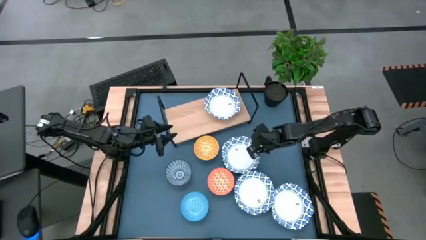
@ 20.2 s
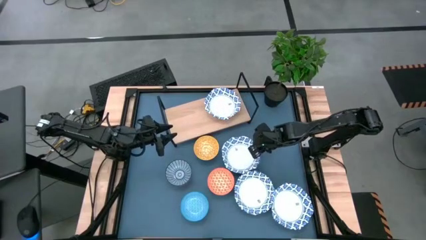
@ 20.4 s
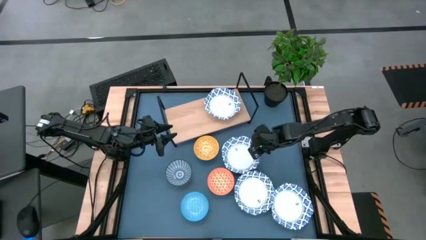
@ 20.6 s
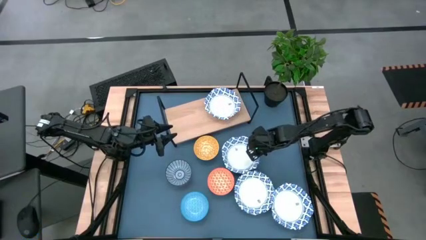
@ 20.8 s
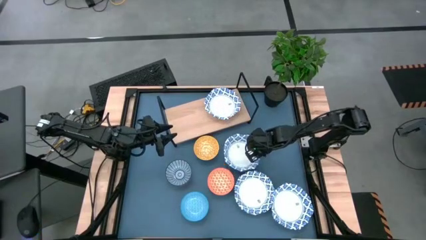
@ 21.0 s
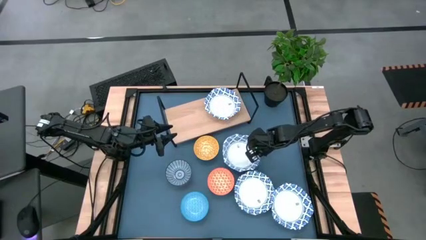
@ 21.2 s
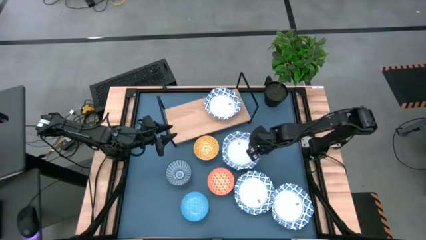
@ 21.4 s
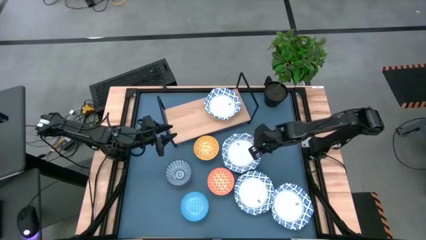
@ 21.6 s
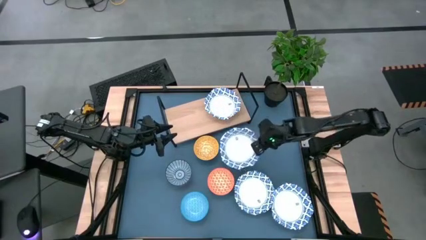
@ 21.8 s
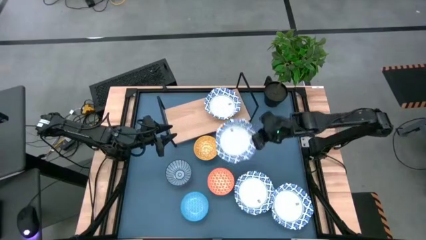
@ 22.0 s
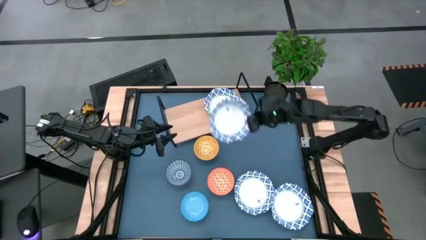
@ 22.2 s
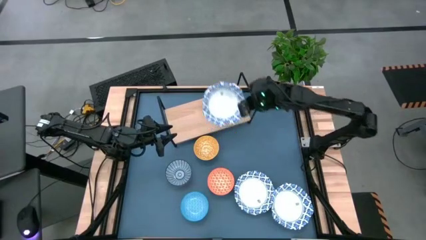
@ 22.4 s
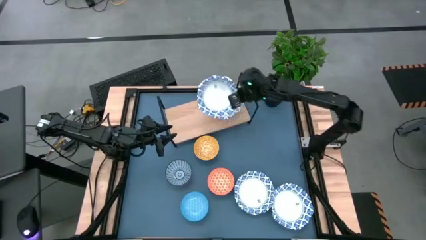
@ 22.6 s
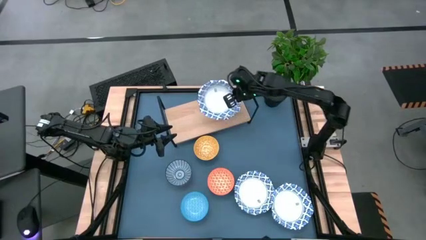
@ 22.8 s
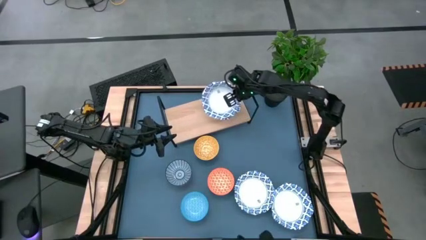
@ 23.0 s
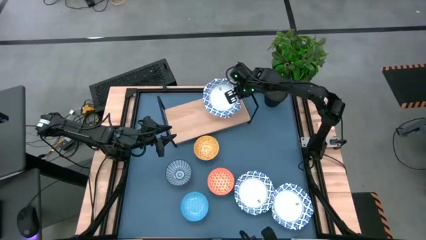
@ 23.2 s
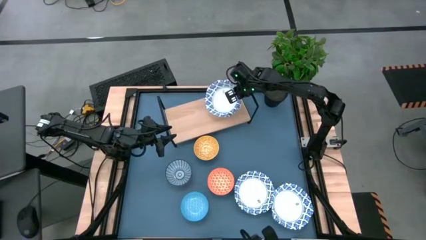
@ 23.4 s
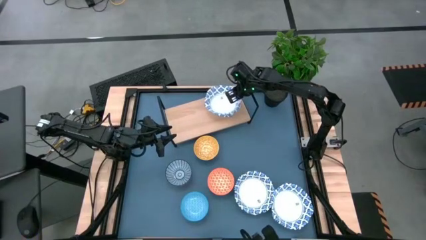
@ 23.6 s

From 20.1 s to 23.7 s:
Task: Place and stack bowls onto a shelf
Stack the white patterned bowl on top of the white patterned bowl on the shelf

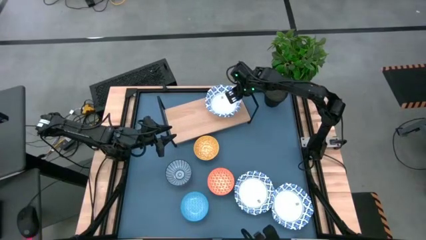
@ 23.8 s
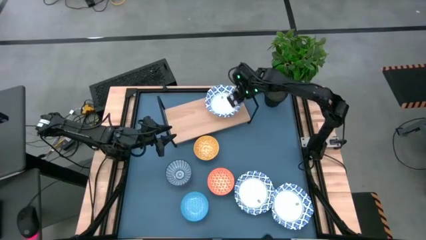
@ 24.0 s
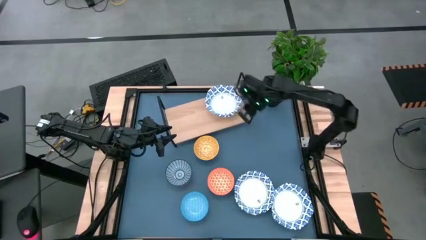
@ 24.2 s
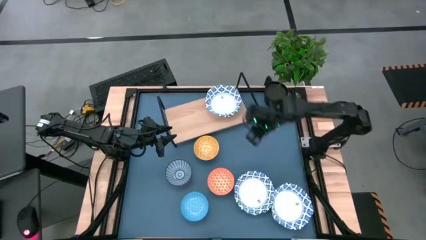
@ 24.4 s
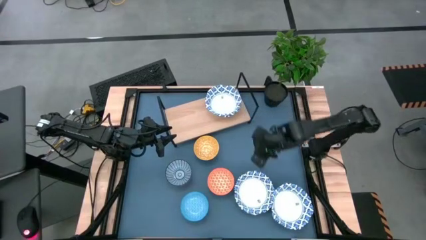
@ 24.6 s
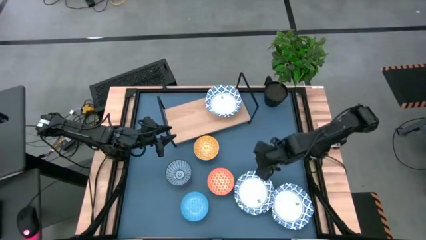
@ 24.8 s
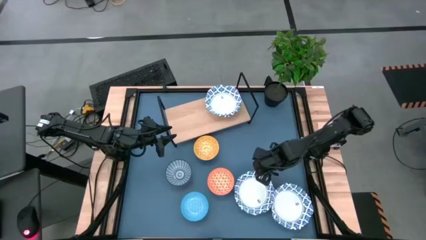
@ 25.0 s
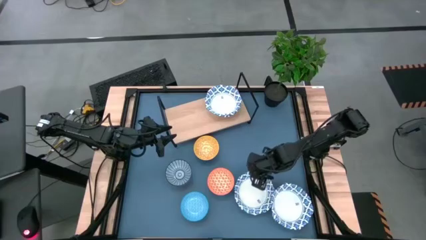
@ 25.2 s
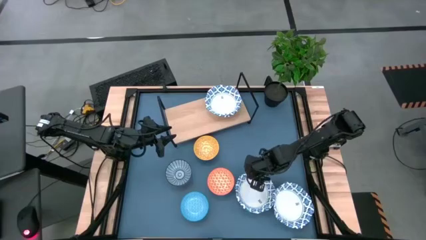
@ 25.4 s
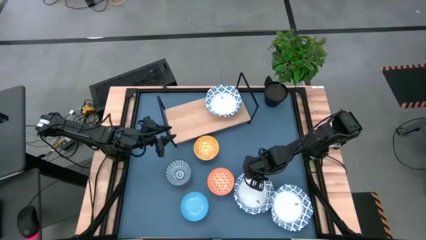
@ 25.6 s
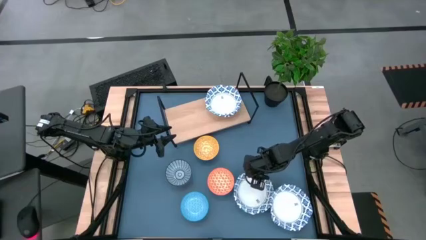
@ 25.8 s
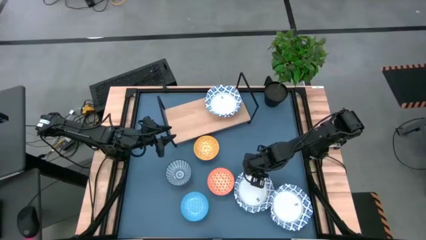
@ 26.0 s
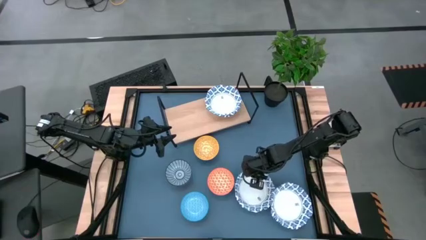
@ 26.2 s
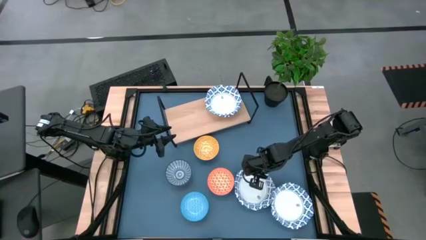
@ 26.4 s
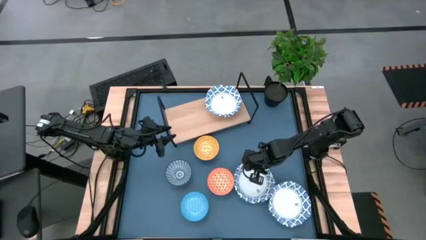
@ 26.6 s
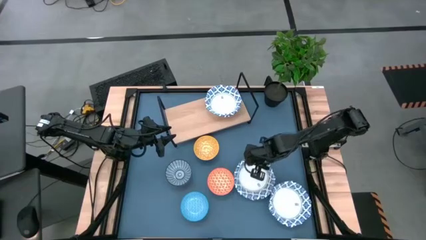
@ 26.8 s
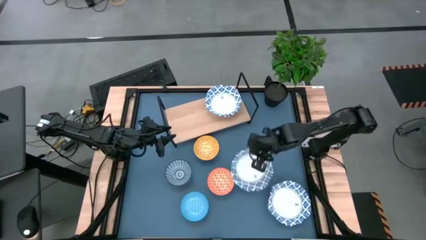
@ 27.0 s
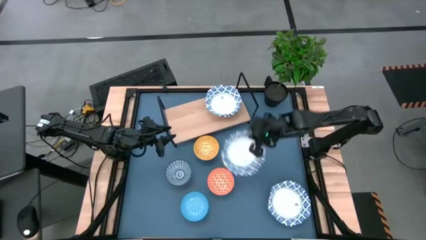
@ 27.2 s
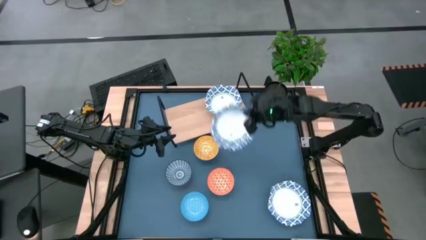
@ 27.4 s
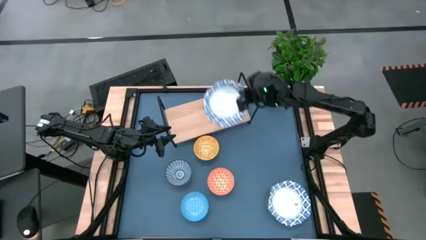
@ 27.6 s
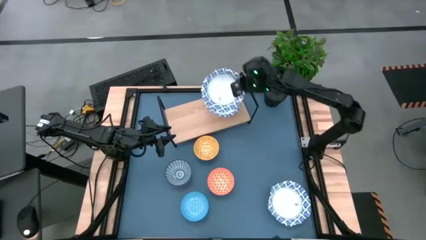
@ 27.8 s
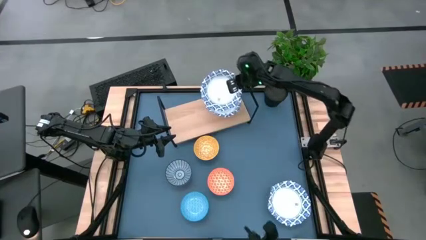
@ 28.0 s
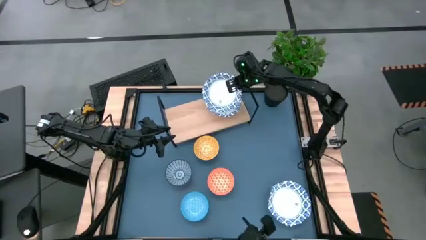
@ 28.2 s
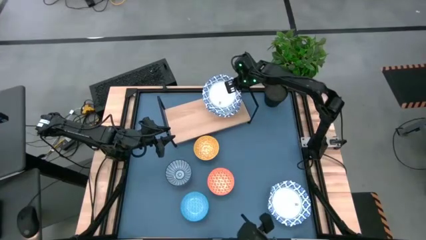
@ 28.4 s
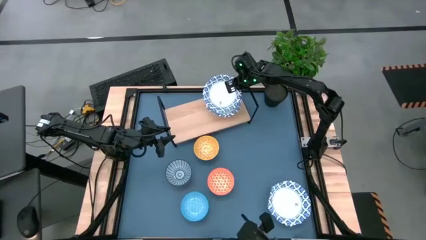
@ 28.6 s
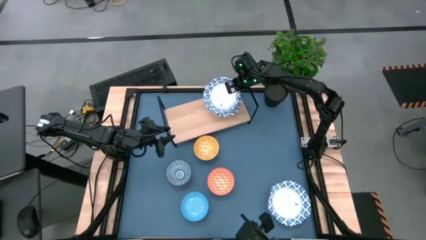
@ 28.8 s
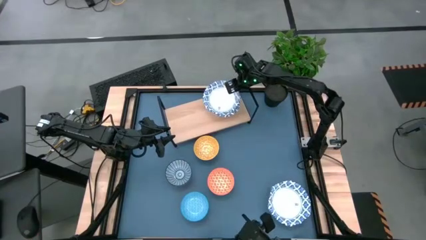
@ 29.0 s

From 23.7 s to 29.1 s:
Stack the white patterned bowl on top of the white patterned bowl on the shelf

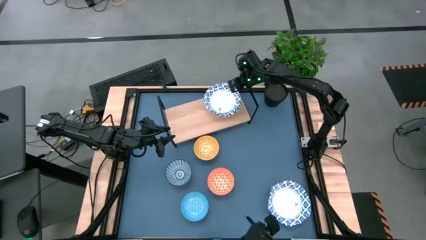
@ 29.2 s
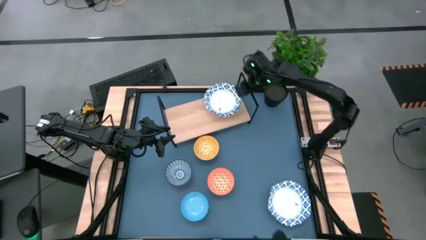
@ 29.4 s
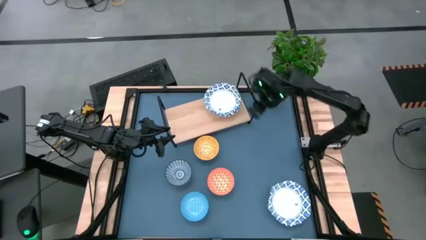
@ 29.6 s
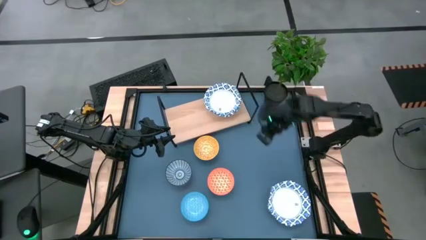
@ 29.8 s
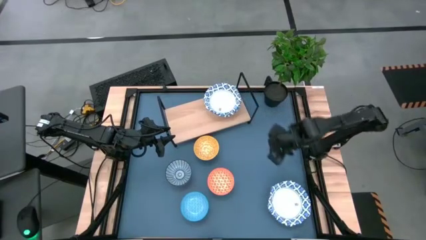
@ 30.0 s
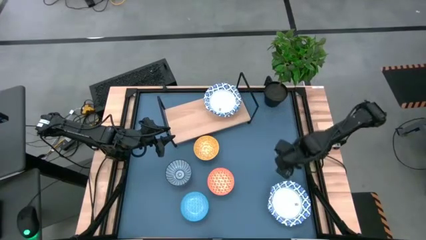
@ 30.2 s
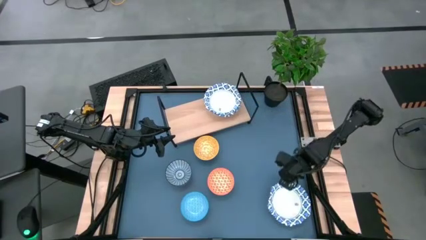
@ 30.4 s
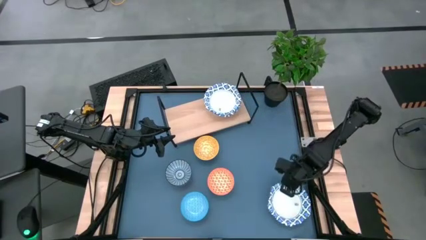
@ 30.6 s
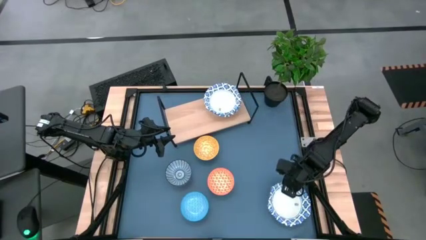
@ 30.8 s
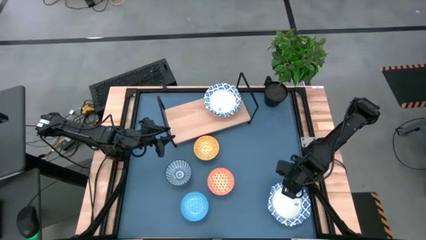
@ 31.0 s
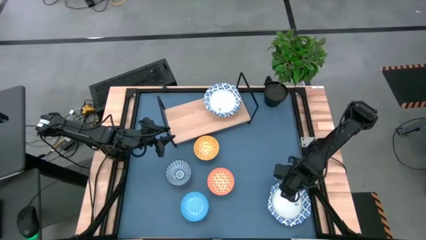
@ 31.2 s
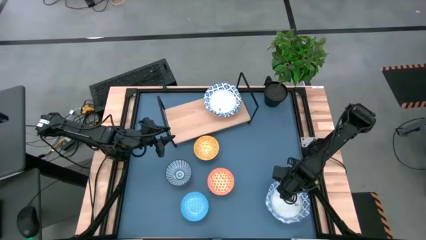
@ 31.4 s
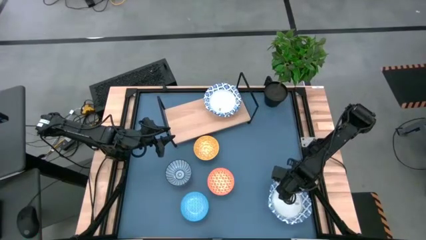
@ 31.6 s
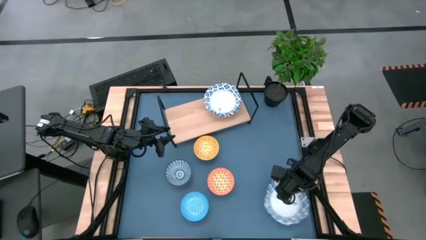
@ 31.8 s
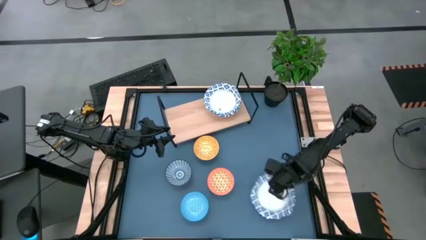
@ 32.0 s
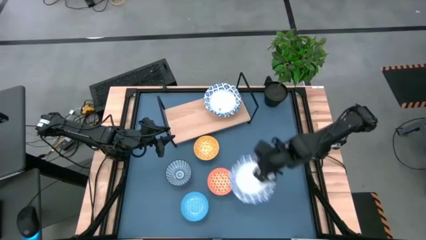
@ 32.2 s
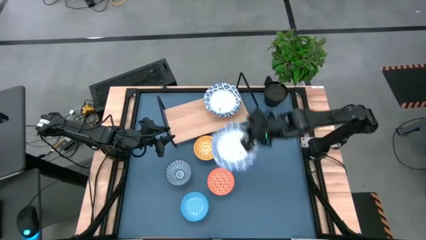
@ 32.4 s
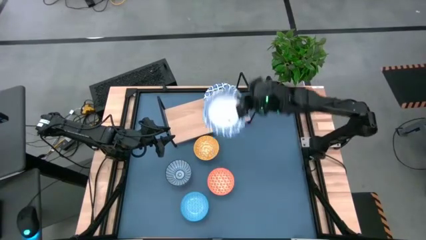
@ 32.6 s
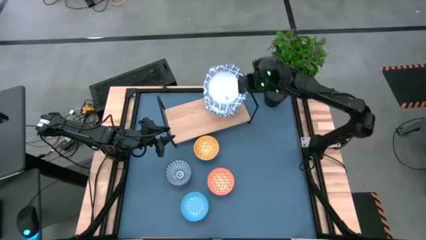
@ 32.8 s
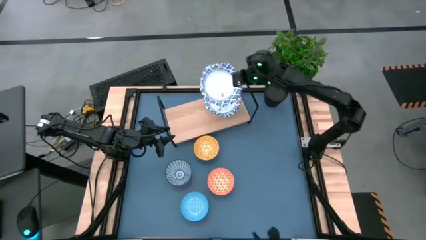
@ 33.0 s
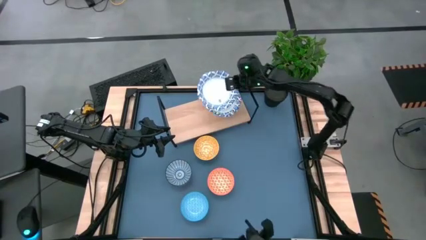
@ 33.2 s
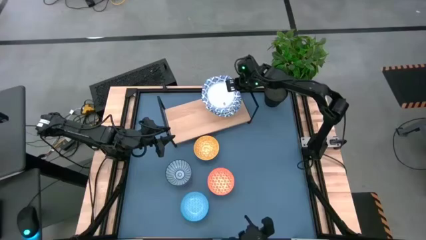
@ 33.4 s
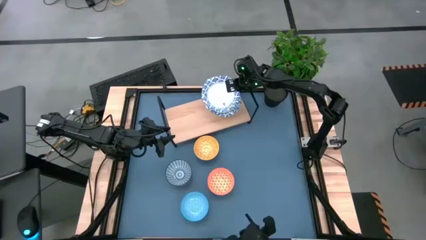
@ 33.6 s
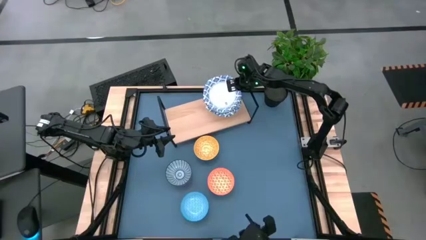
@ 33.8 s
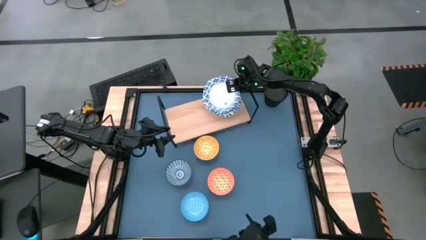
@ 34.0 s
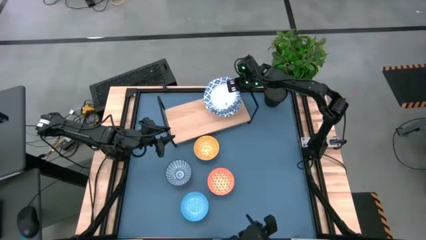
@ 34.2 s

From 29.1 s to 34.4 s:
Stack the white patterned bowl on top of the white patterned bowl on the shelf
